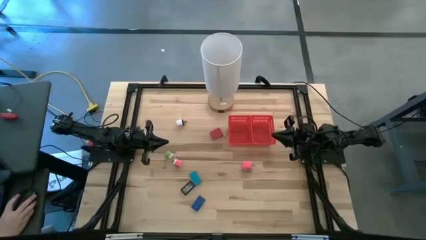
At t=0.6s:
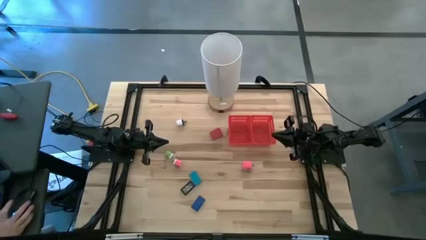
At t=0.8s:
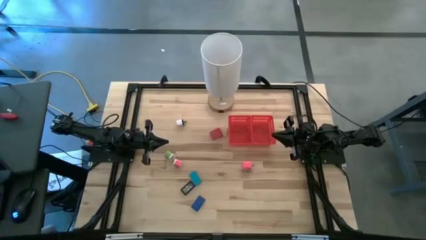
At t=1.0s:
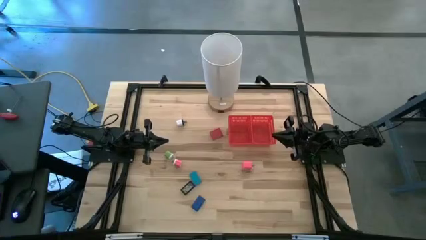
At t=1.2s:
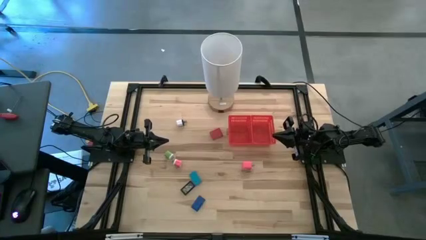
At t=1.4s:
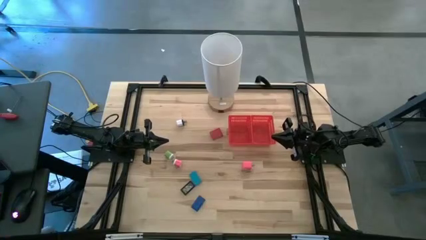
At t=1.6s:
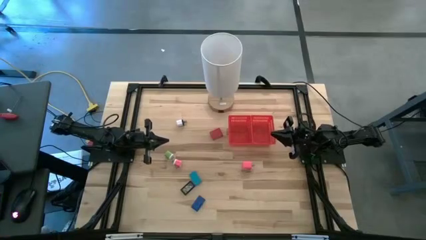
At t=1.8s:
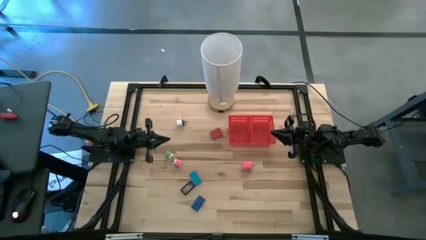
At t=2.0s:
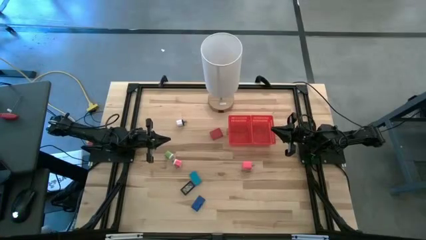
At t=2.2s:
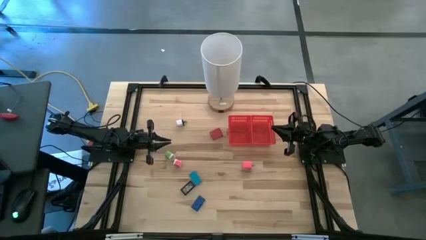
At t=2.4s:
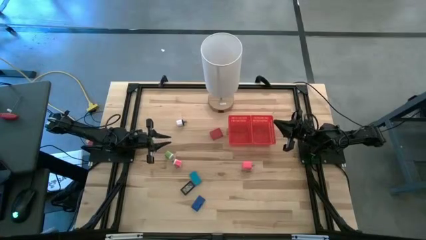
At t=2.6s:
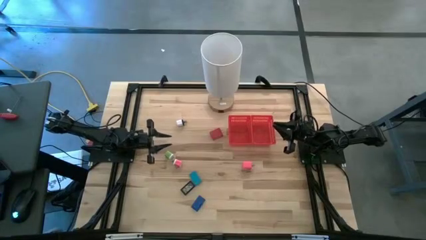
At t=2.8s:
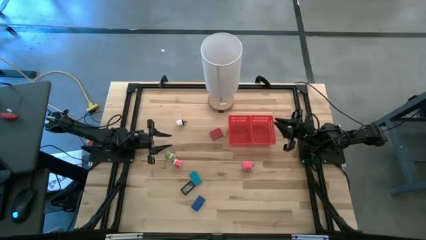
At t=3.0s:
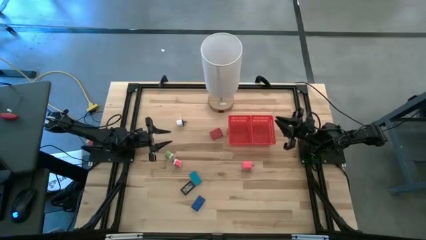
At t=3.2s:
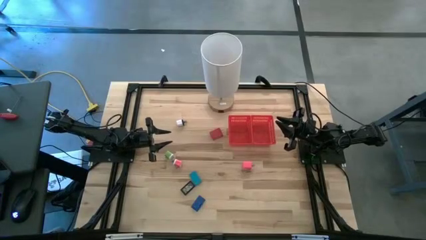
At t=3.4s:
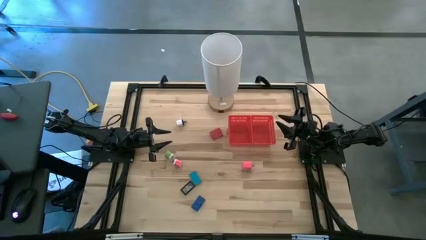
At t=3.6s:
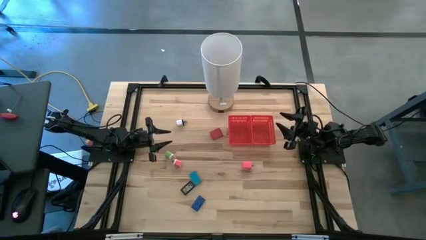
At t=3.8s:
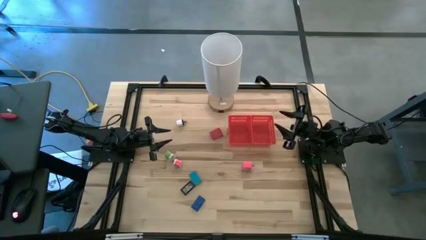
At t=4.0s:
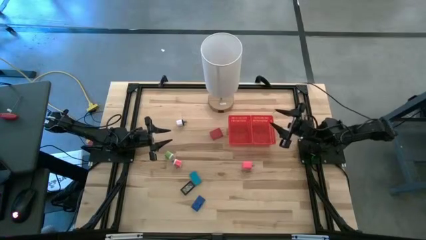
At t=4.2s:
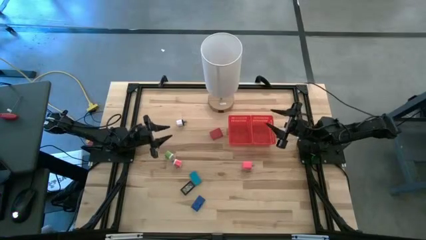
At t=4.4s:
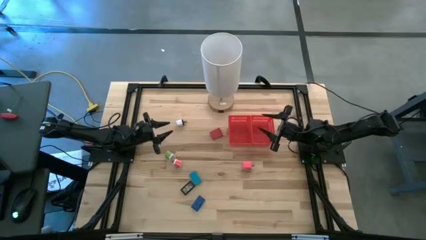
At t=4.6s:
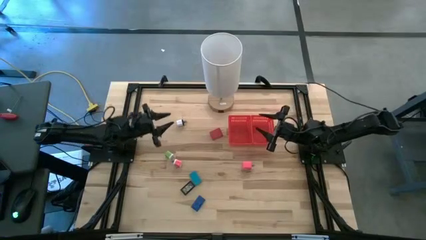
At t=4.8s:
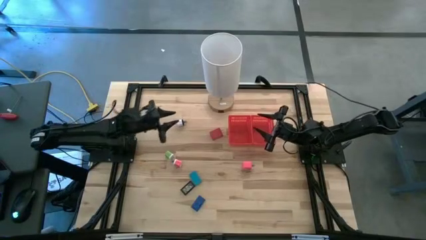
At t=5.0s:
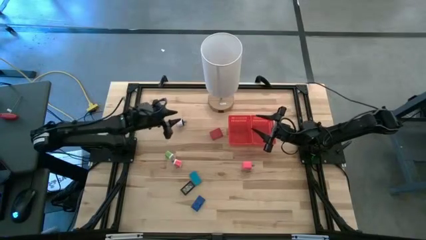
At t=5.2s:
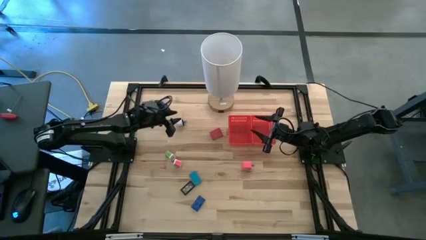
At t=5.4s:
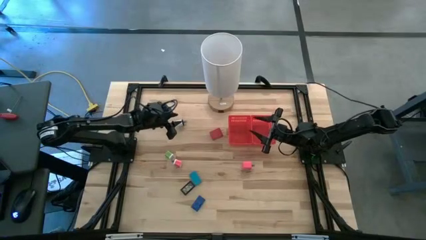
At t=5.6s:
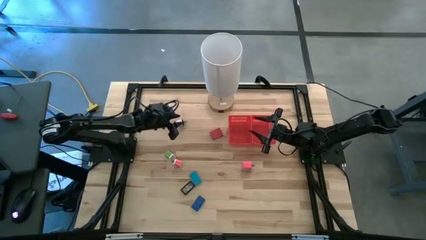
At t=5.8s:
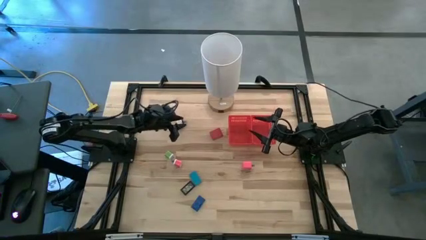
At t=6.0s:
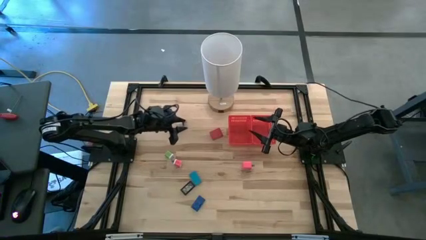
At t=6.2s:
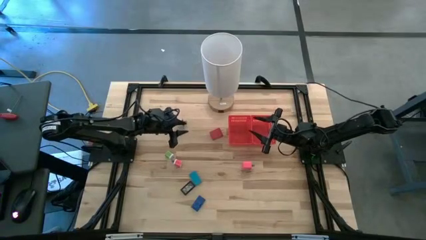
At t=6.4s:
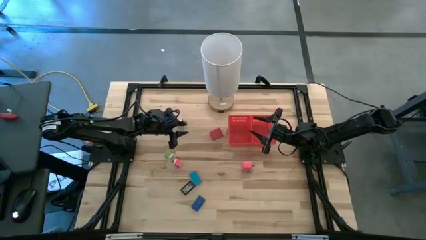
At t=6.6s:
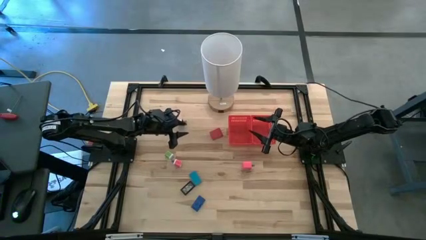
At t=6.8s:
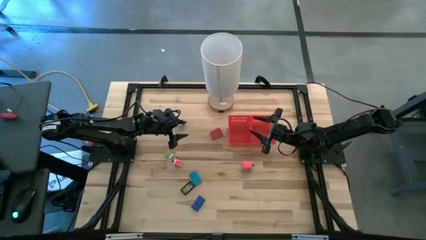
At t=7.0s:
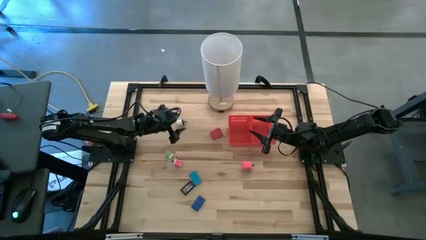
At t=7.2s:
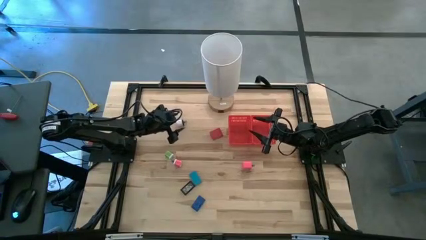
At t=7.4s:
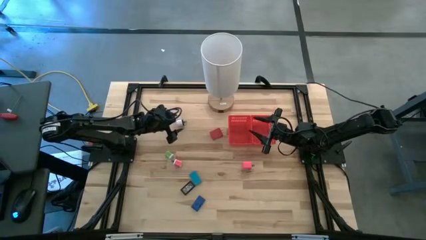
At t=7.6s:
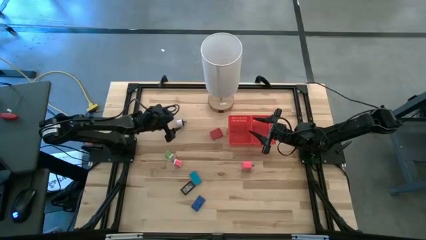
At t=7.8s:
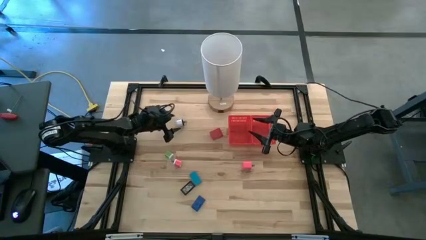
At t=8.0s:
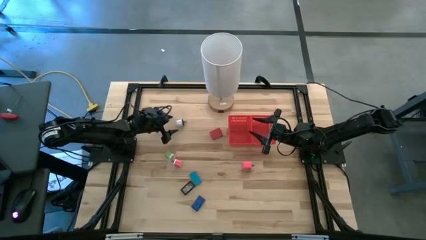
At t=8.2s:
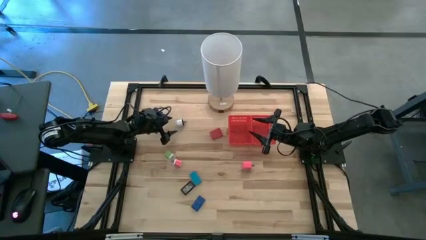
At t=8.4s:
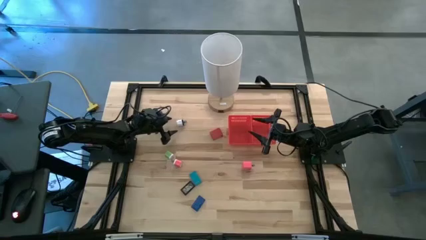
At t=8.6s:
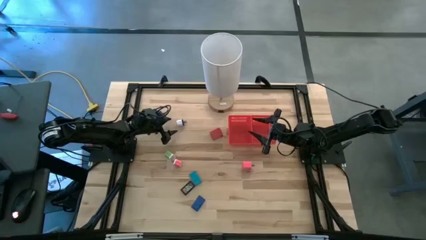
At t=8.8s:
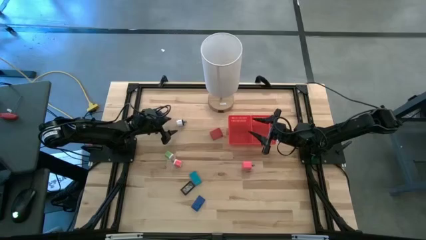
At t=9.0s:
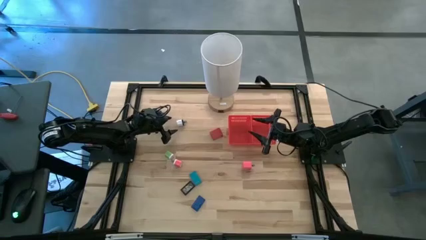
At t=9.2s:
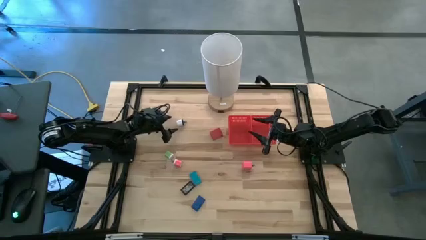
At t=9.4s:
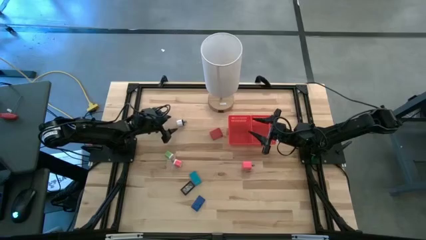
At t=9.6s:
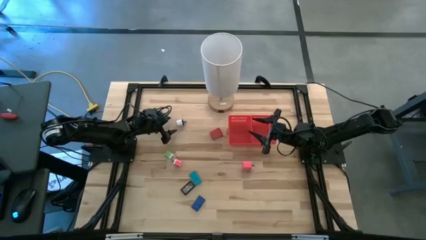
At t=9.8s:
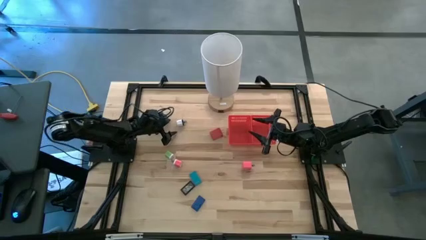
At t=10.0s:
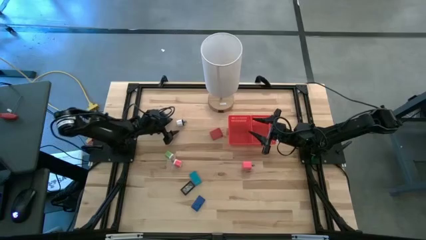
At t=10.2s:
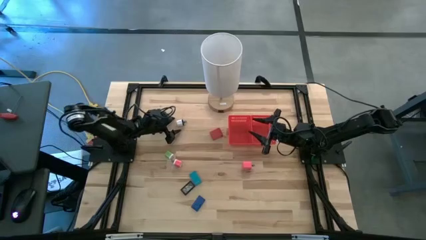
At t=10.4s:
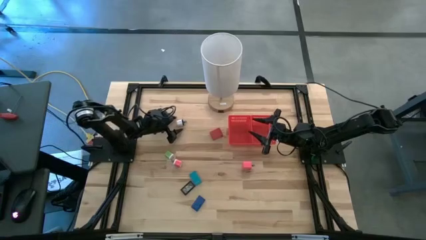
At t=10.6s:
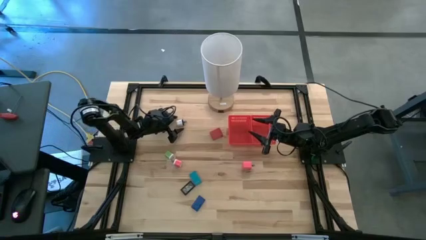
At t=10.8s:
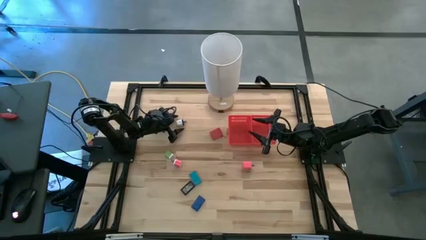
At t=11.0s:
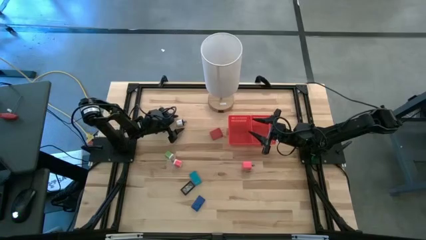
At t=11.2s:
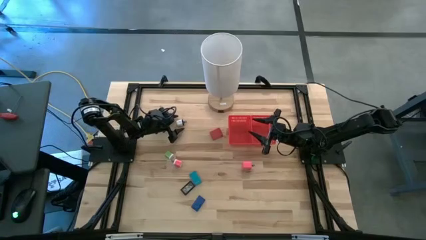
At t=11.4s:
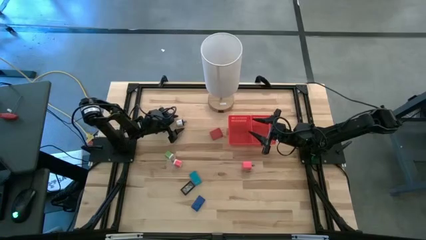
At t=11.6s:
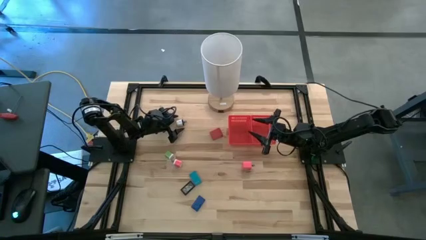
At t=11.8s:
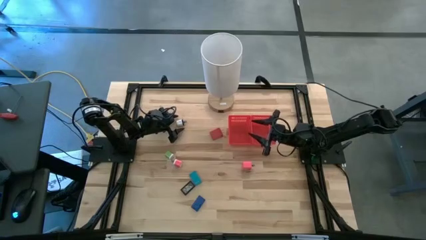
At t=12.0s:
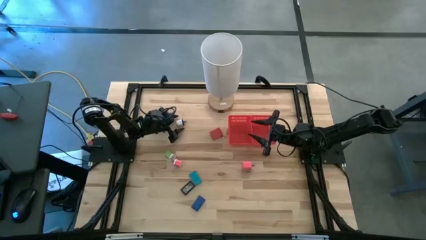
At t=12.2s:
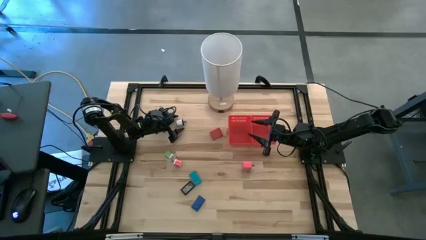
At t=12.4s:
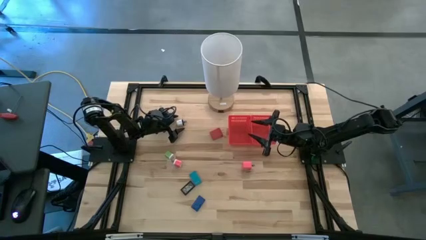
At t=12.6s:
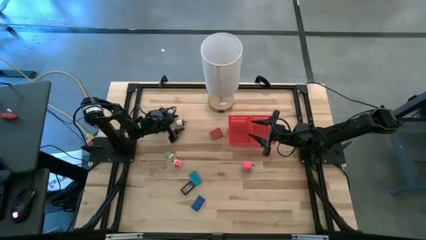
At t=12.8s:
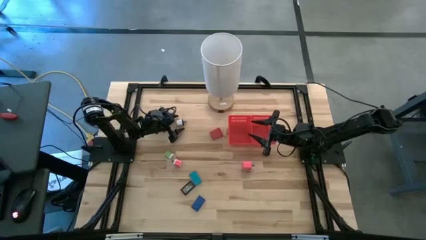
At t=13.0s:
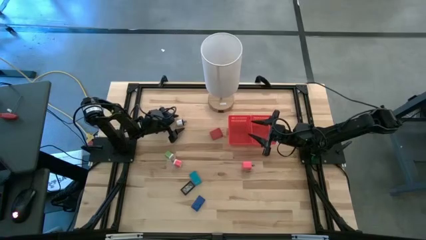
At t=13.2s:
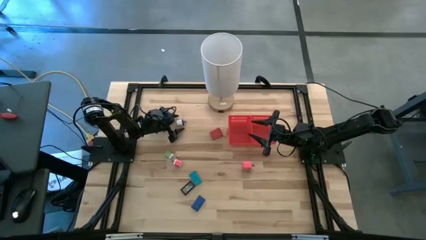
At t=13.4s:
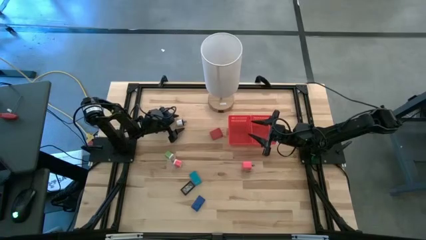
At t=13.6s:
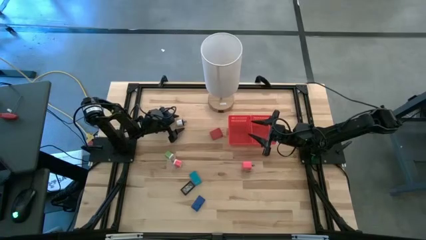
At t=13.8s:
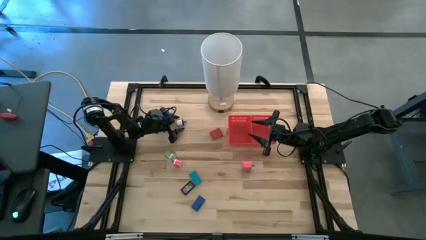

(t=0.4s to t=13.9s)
Task: Pick & Place Office items
Put the white charger adapter into the right red bin
